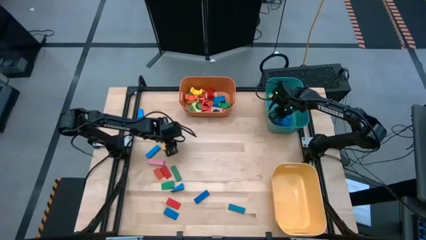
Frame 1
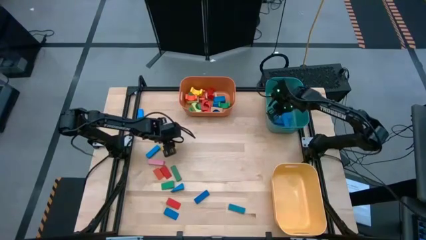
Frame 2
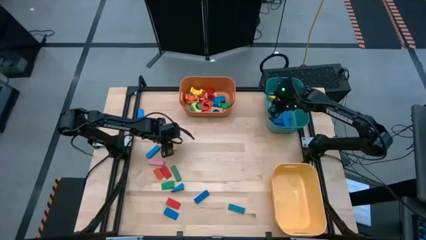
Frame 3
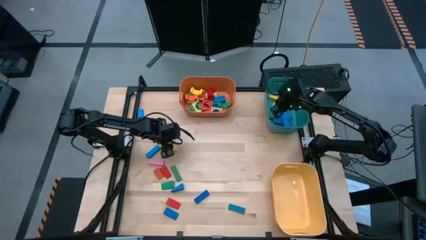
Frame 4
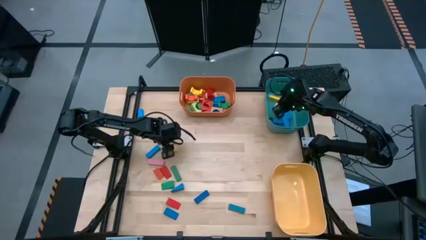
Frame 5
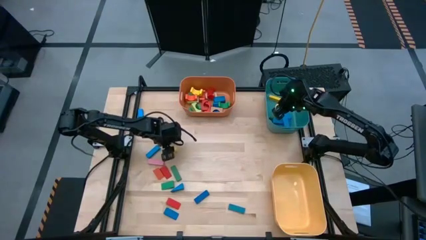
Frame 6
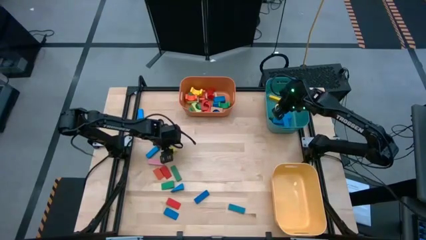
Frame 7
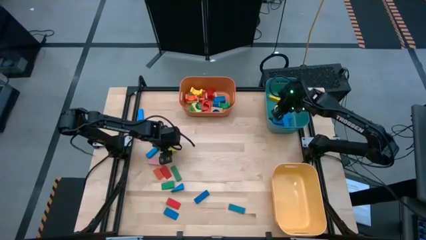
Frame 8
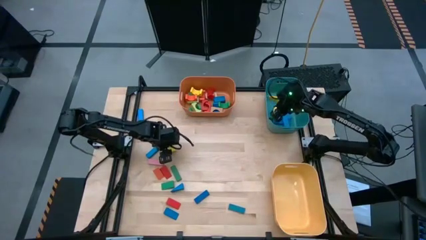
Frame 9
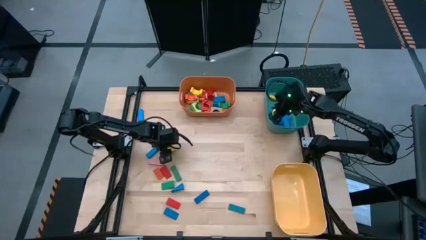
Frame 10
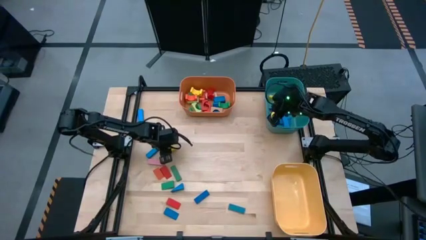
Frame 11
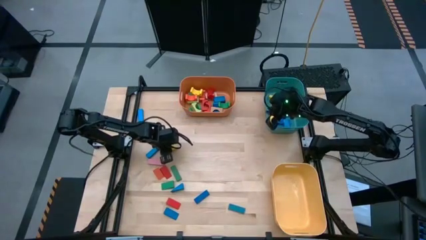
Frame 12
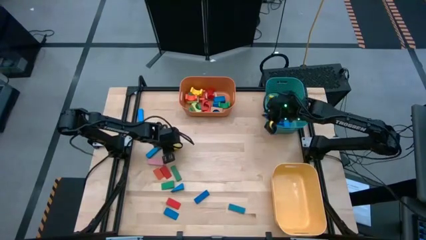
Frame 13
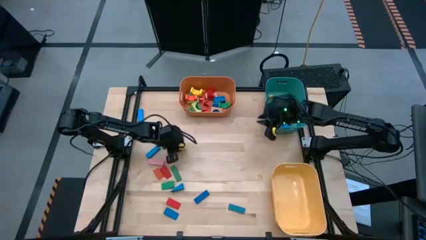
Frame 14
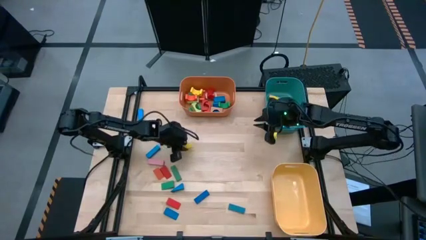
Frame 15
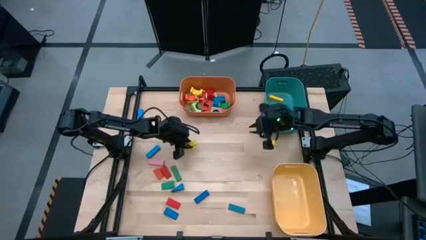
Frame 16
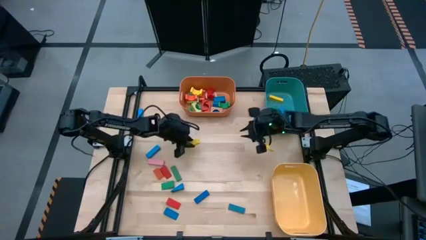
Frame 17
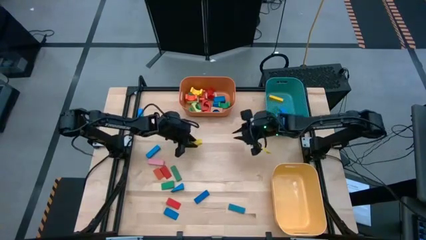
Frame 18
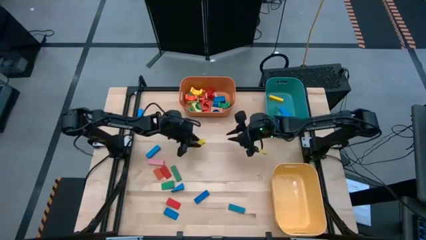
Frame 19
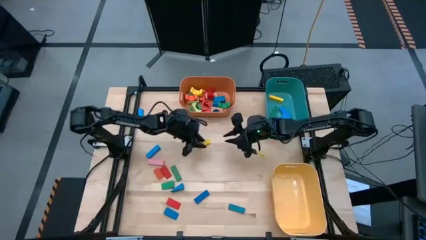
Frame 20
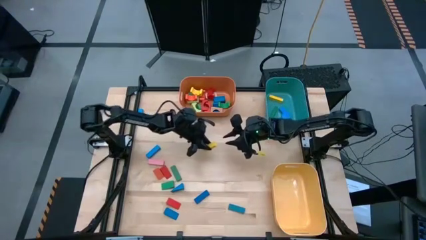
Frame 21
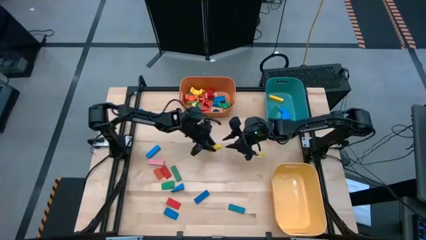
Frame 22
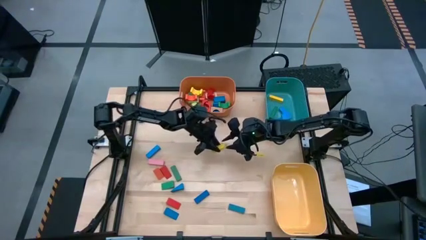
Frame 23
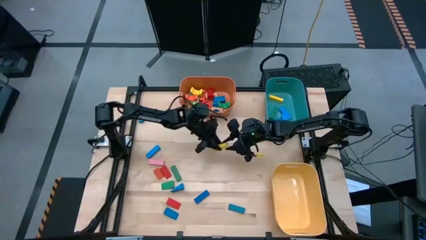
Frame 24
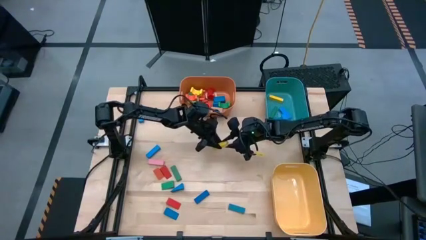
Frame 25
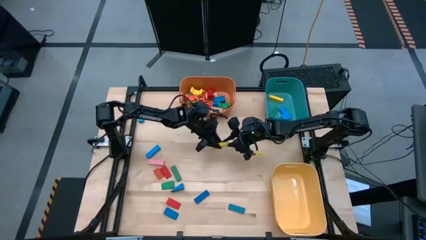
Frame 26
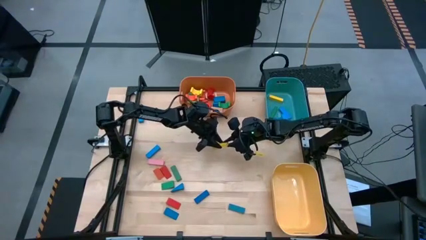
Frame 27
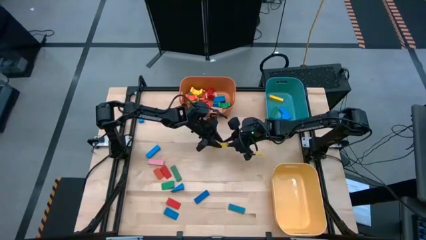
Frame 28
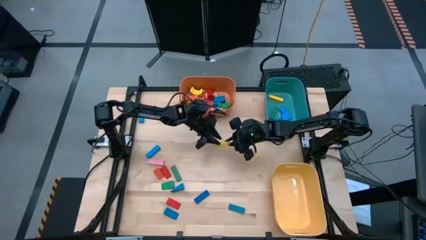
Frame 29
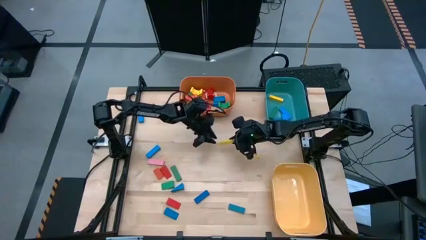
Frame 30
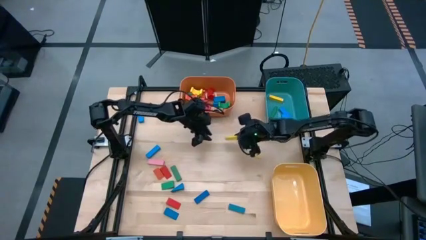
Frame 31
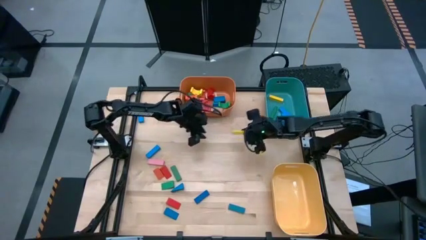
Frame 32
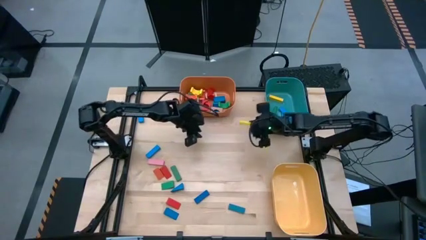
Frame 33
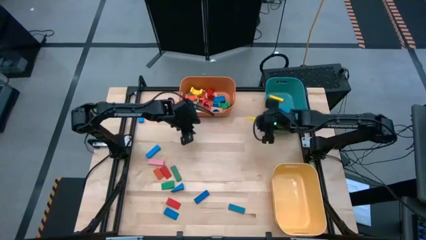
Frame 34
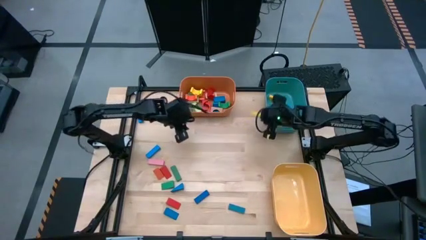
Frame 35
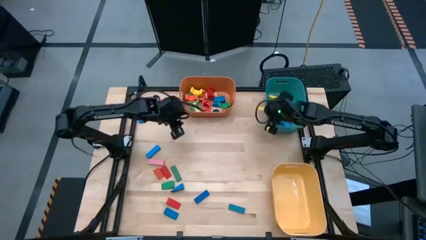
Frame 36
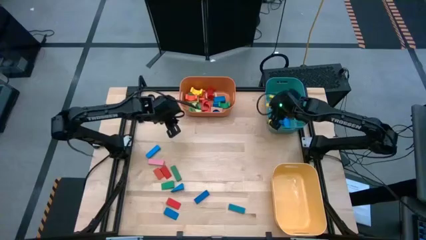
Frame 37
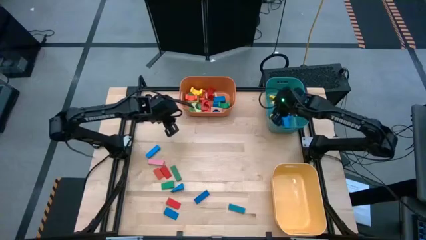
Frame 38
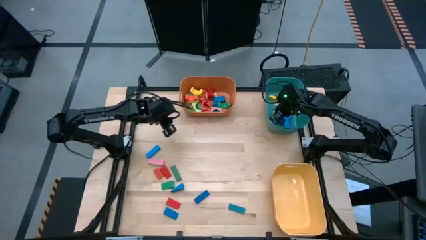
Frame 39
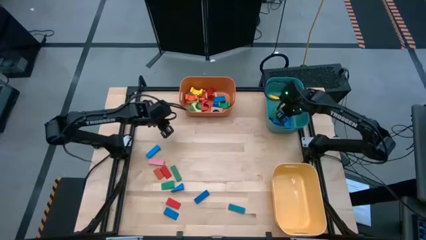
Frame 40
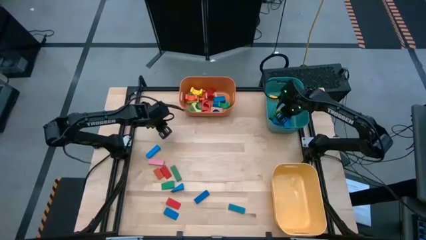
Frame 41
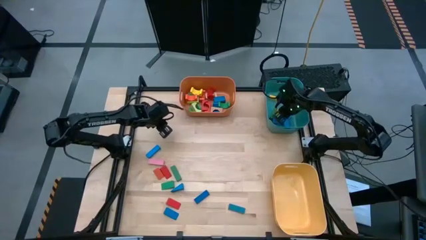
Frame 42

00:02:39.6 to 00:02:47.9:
Task: Sort blocks by size
Put the yellow rectangular block into the green bin
